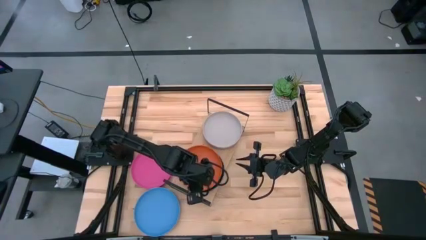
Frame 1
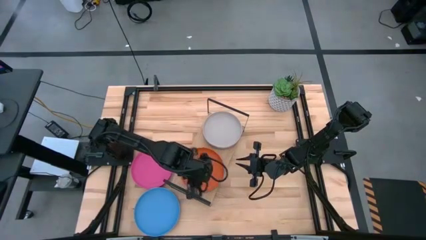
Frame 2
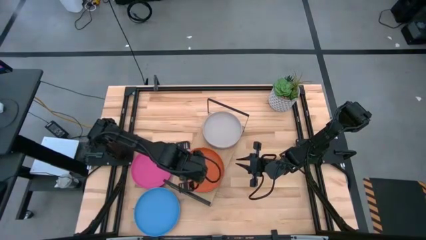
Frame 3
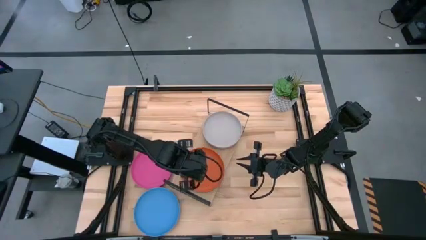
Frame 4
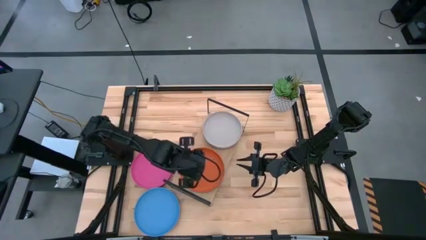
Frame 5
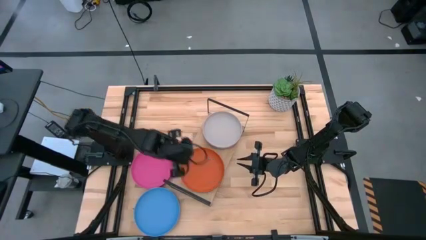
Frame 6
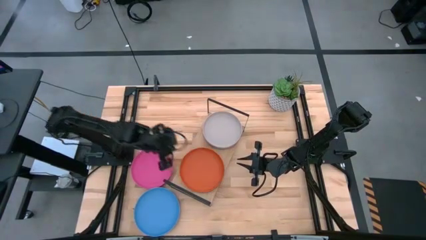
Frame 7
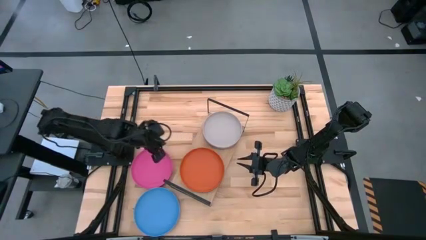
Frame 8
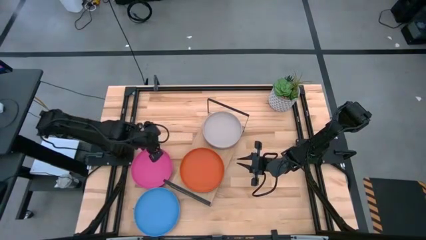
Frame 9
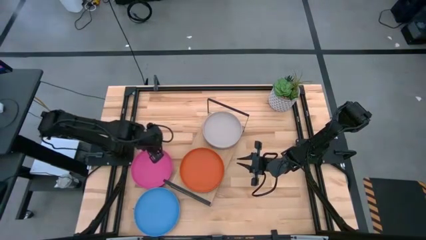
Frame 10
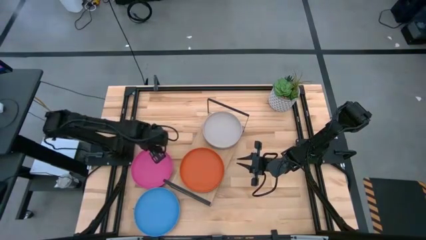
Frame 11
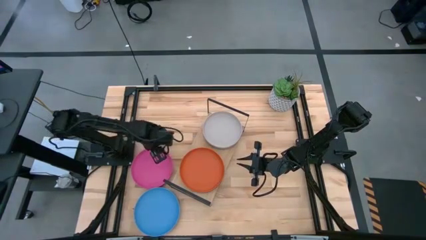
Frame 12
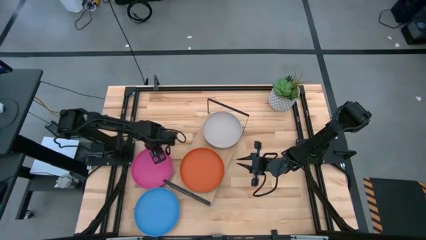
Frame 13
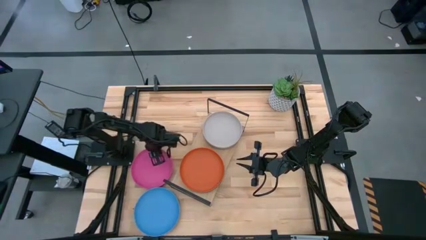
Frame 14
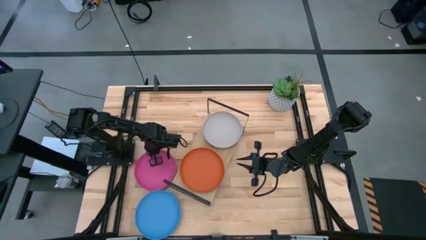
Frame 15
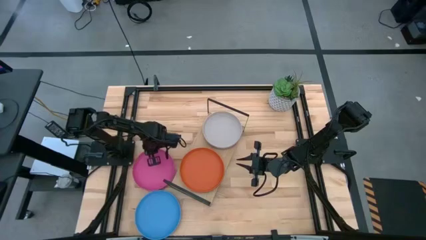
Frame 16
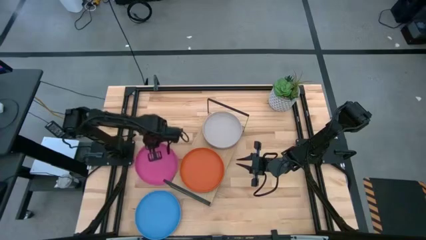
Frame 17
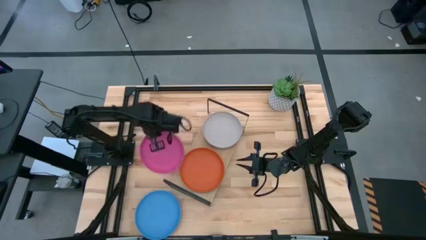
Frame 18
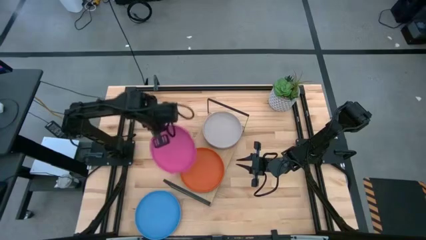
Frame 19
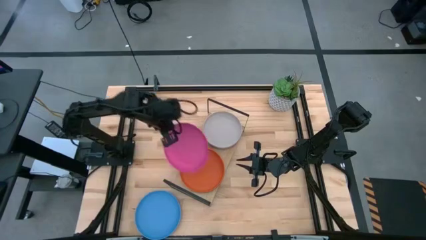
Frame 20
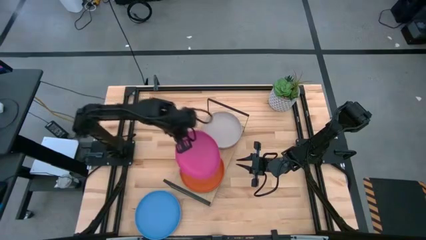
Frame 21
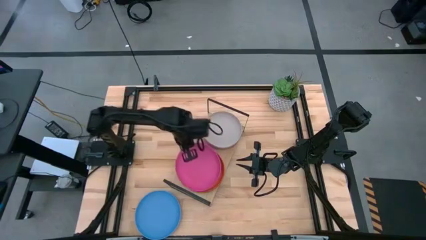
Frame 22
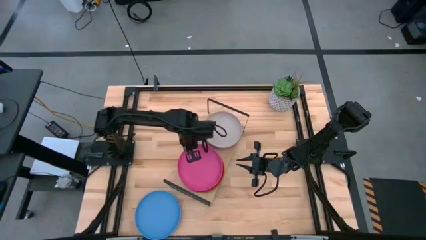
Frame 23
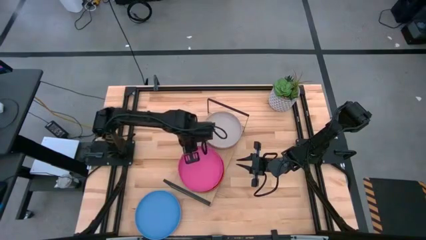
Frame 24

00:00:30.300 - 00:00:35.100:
Task: Place and stack plates onto a shelf
Stack the pink plate on top of the orange plate on the shelf

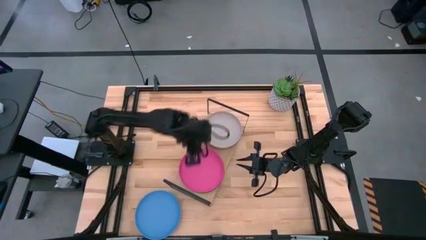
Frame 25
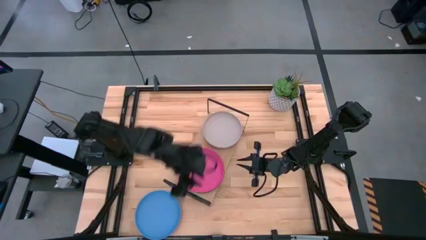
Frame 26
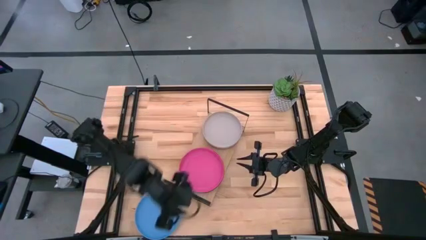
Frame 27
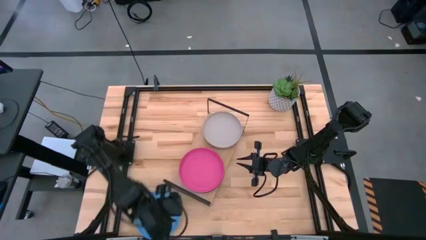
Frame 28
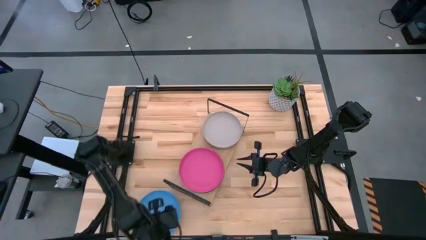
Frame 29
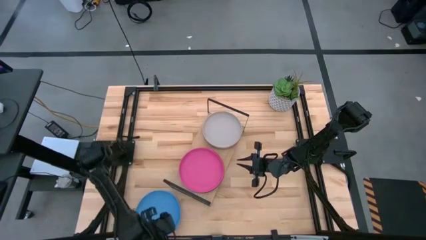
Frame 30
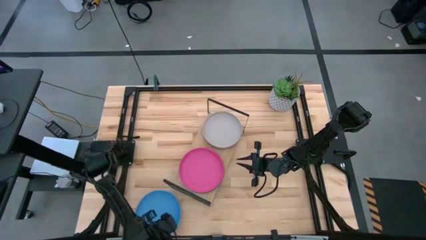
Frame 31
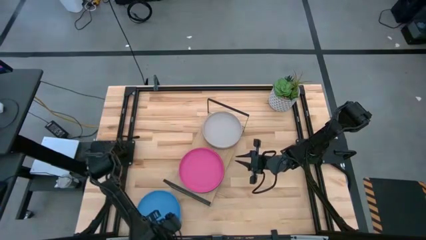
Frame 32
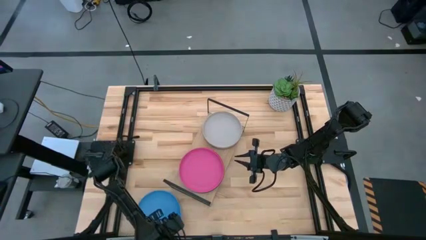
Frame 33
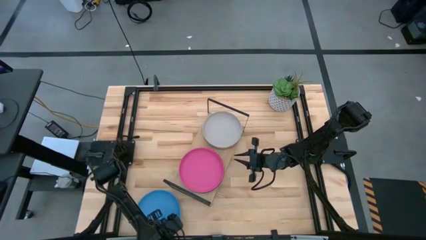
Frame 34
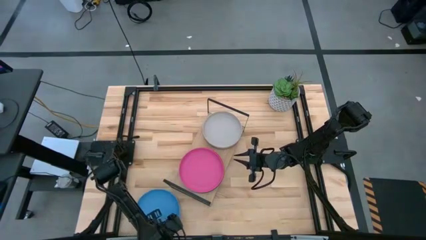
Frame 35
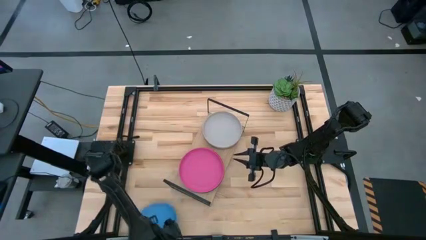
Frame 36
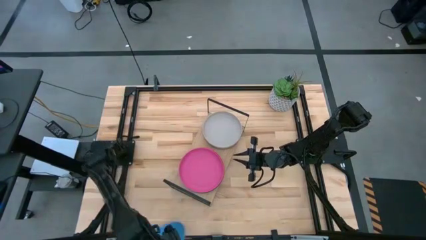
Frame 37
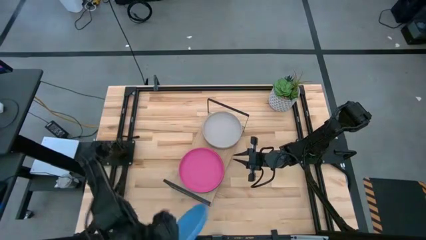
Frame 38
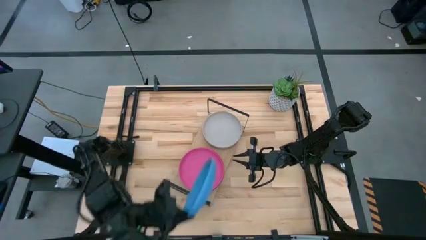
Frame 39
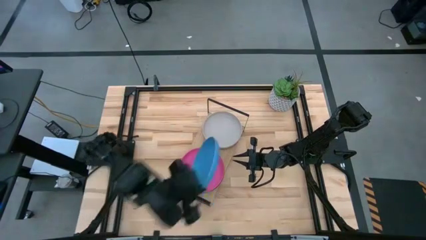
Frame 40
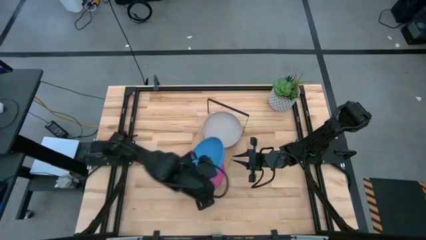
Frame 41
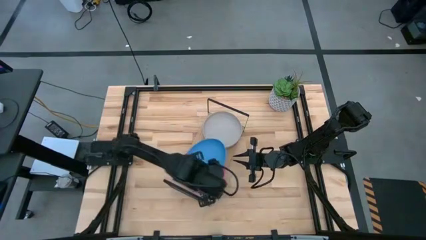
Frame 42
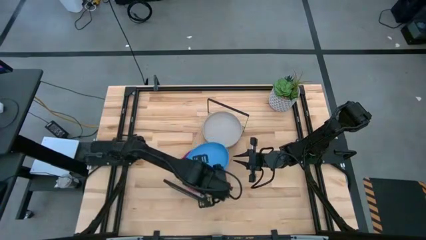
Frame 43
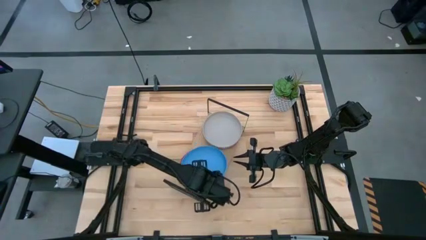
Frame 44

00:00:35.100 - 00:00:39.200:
Stack the blue plate on top of the pink plate on the shelf

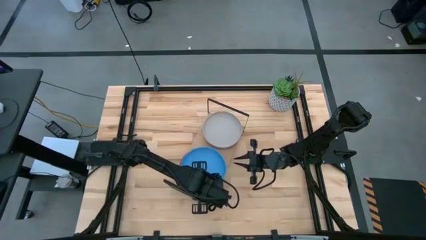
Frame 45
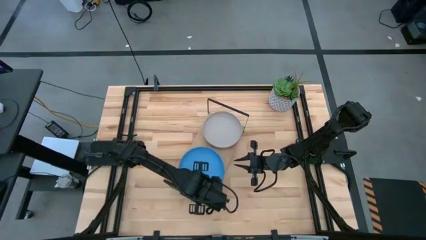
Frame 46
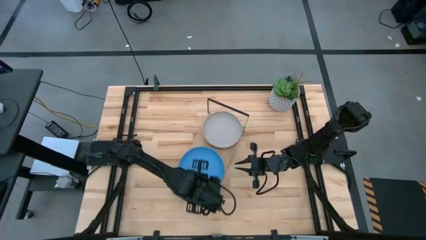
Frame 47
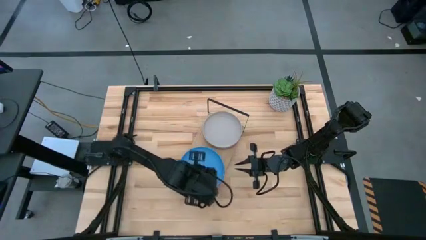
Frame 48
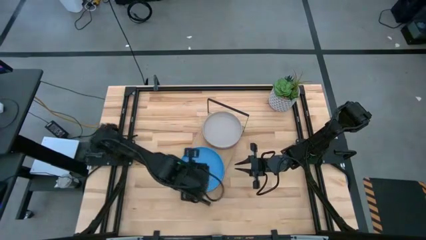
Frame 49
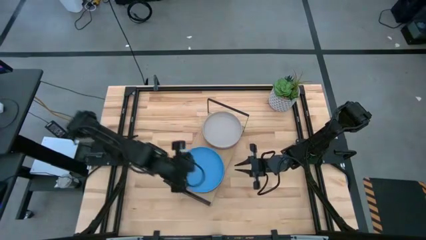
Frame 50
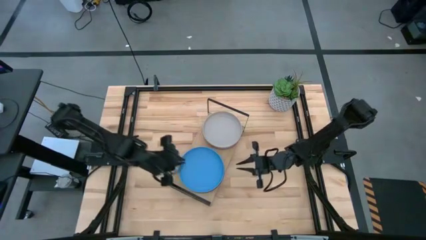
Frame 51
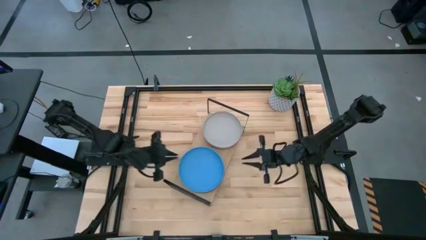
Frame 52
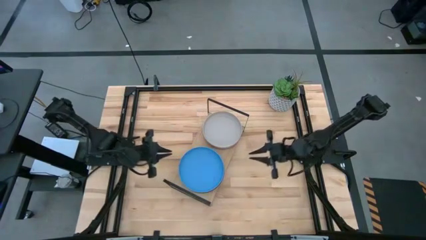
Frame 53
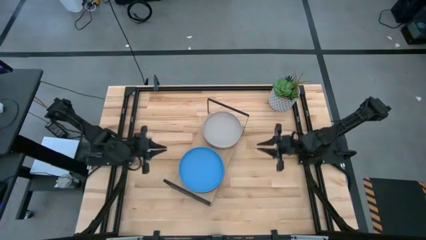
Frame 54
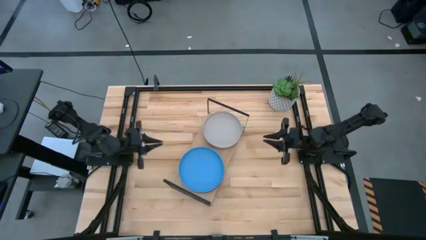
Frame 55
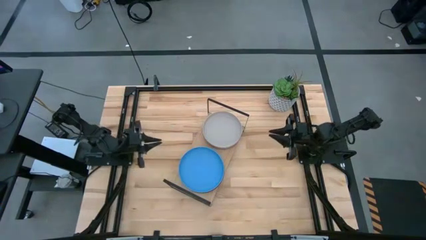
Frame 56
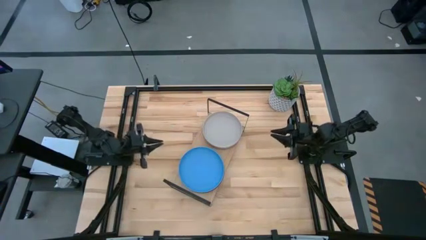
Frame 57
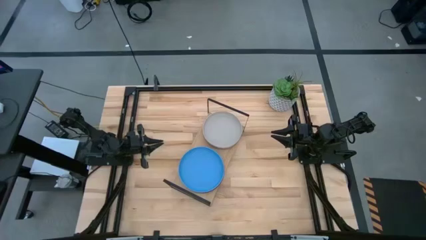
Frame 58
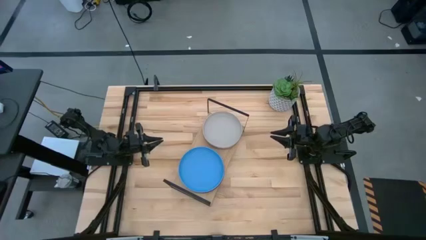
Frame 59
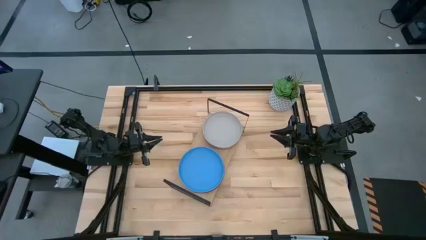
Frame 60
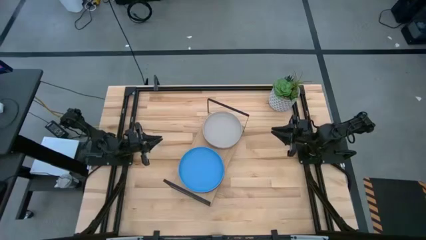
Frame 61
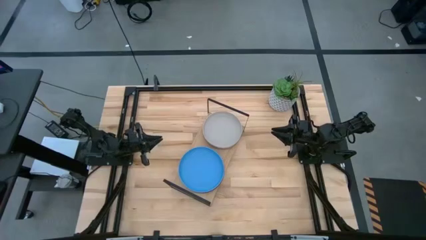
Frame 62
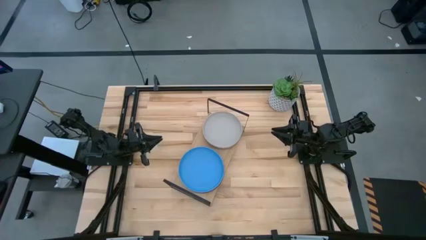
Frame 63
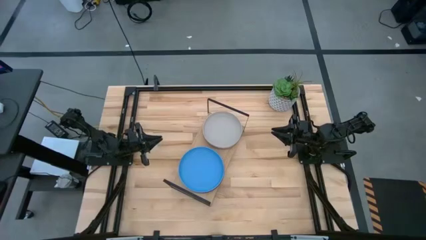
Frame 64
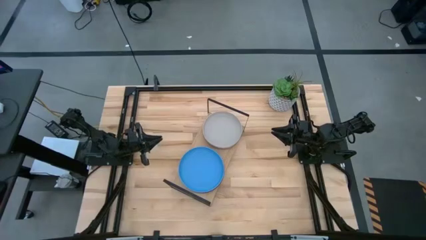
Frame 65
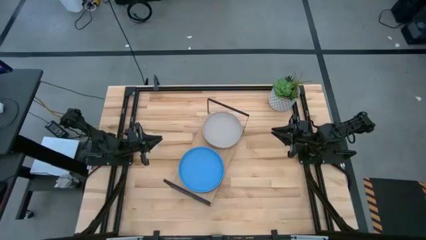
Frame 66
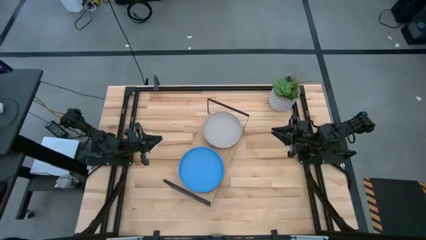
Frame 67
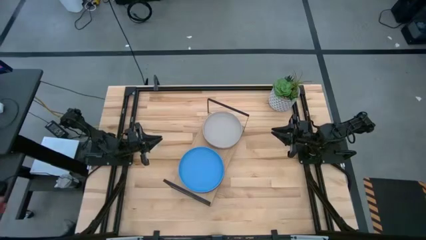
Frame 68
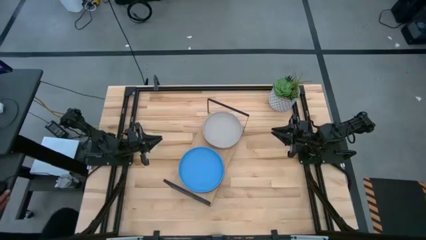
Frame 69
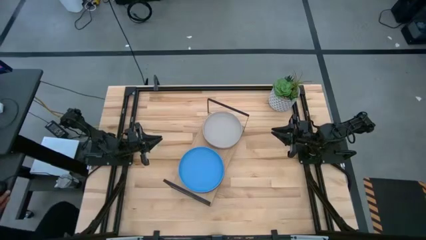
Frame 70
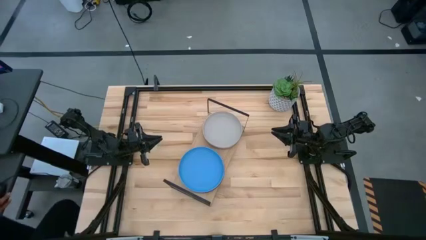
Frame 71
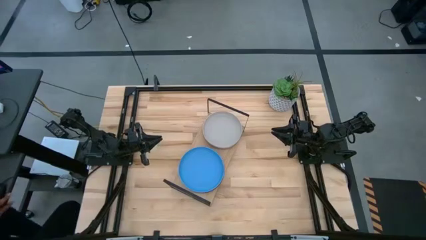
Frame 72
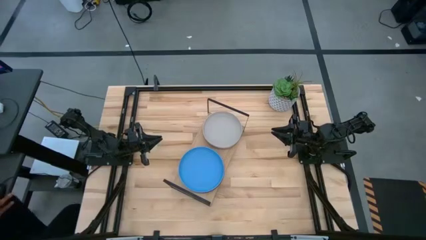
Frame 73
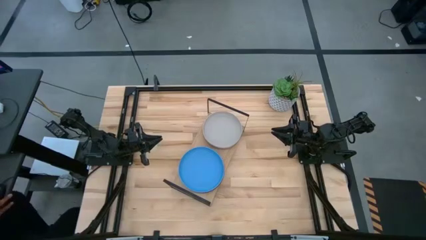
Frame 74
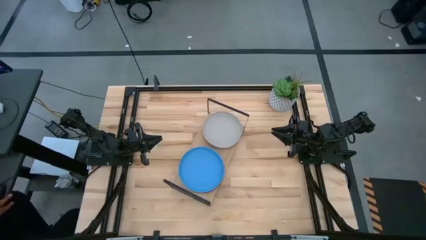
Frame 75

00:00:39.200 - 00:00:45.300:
Return to Home Position

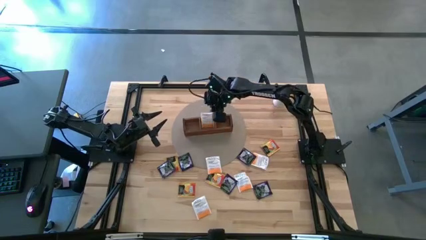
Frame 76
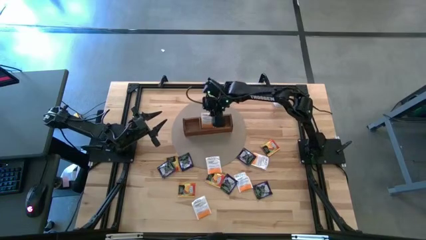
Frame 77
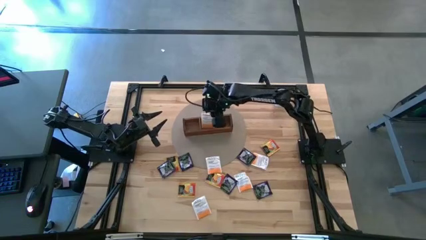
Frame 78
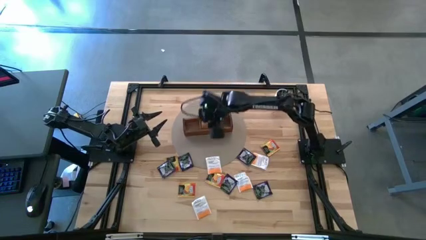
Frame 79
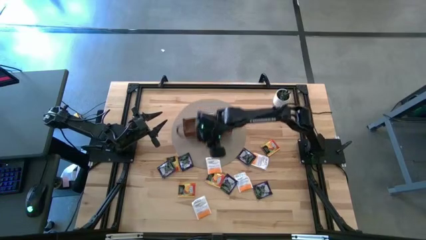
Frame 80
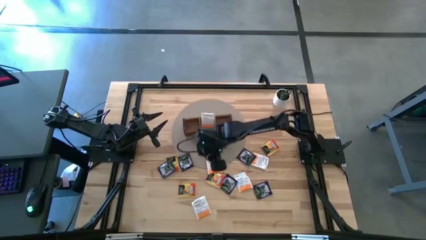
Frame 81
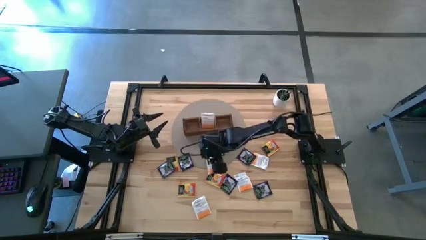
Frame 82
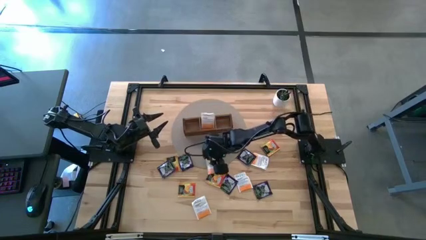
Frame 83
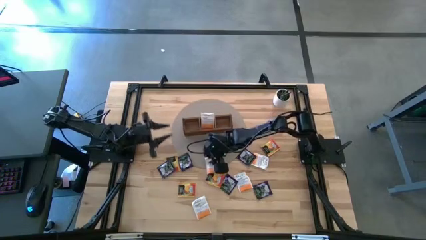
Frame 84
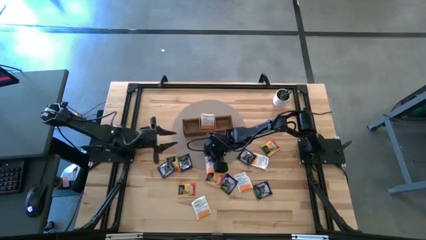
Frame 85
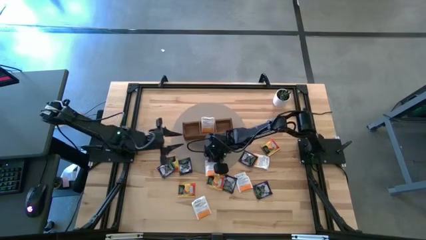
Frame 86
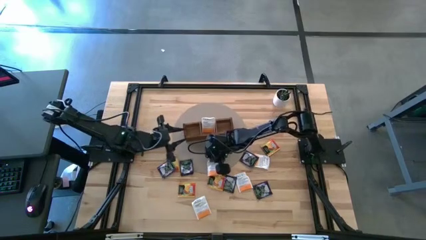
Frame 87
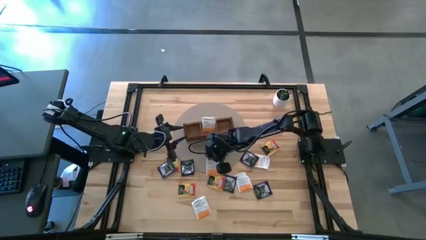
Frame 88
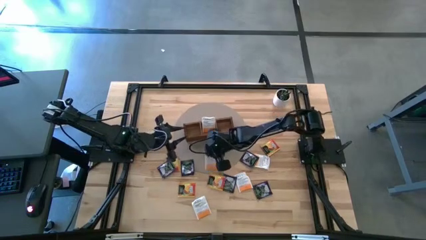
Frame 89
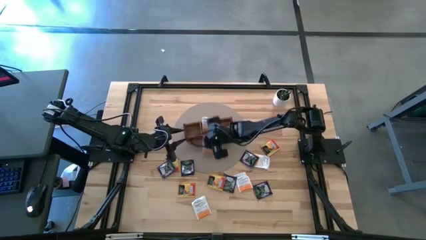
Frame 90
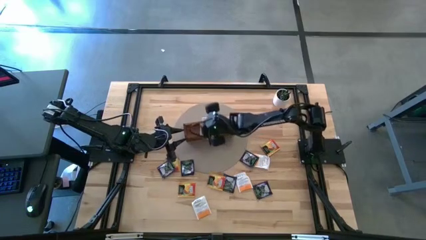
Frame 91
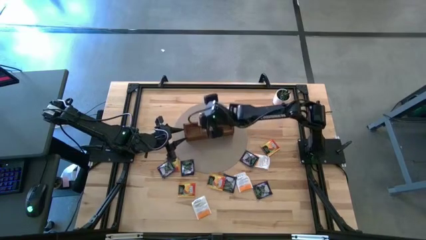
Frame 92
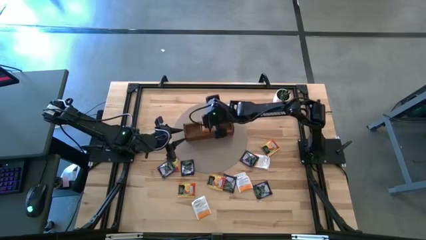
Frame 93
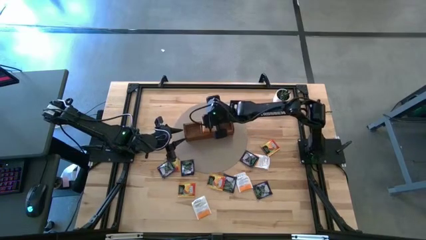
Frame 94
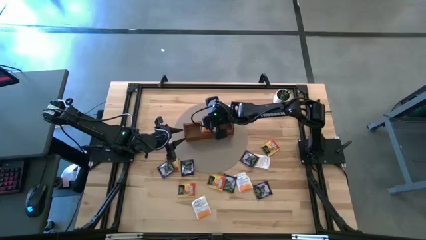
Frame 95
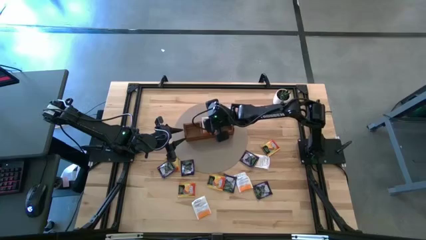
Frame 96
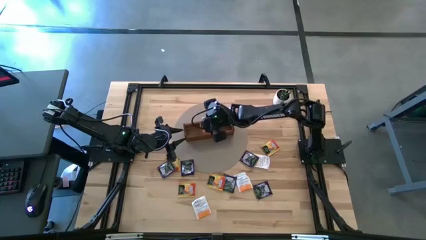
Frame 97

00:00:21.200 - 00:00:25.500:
Task: Pick & Place Tea
Put the white tea bag into the middle section of the wooden organizer
